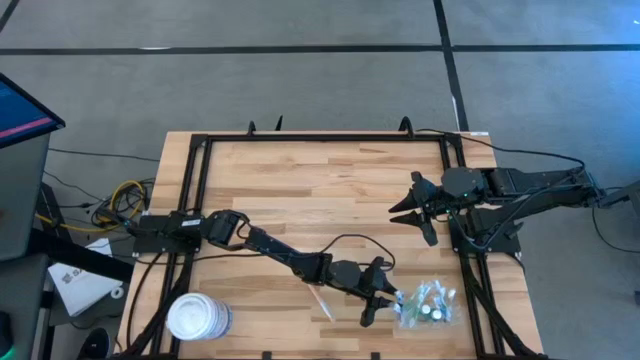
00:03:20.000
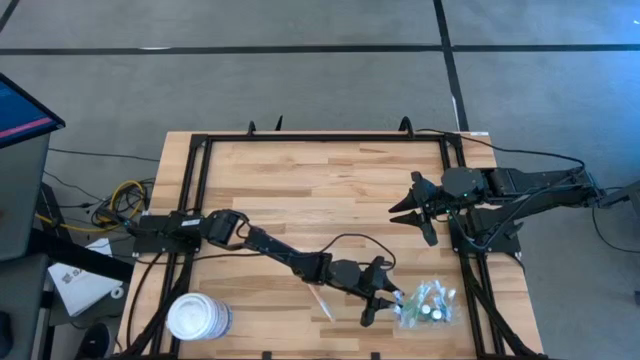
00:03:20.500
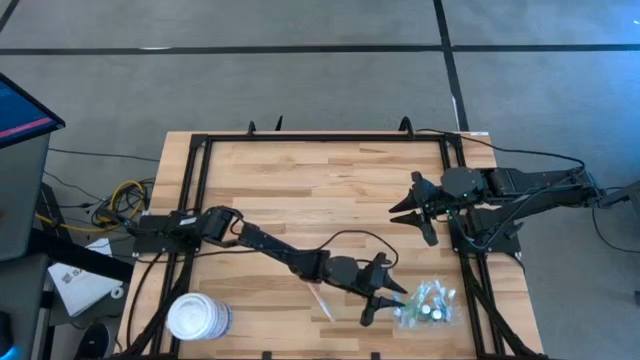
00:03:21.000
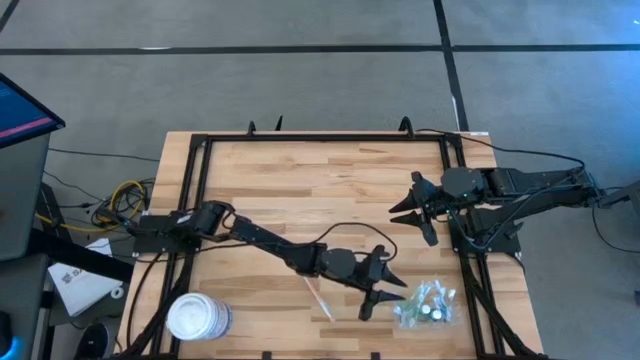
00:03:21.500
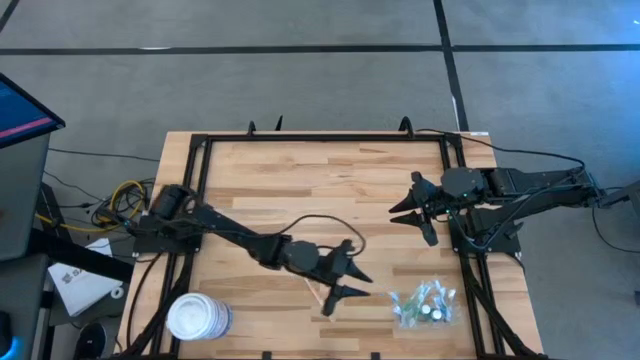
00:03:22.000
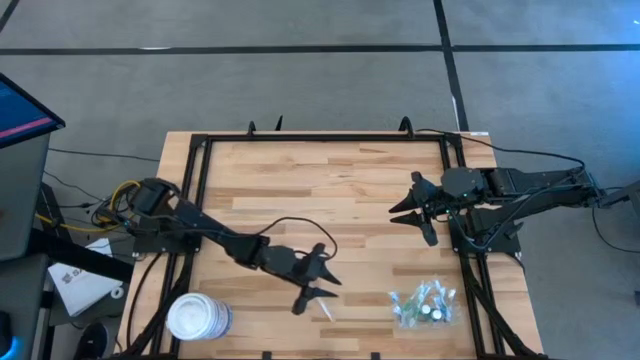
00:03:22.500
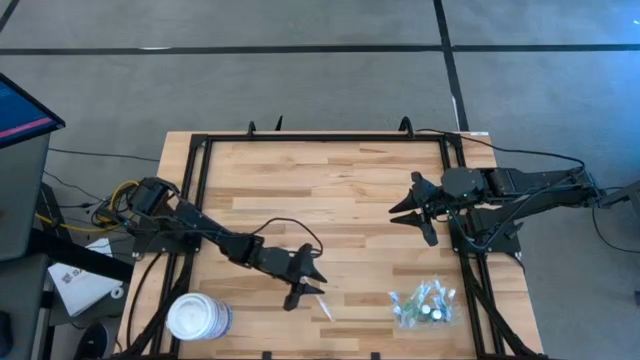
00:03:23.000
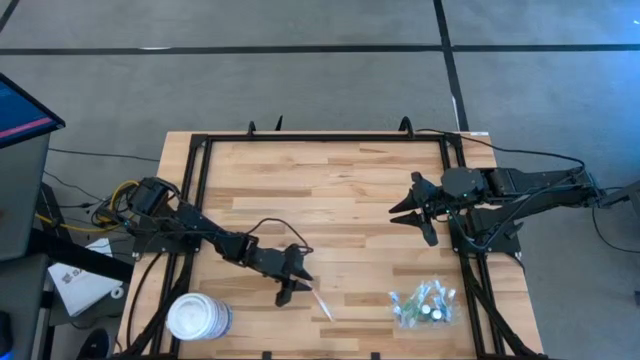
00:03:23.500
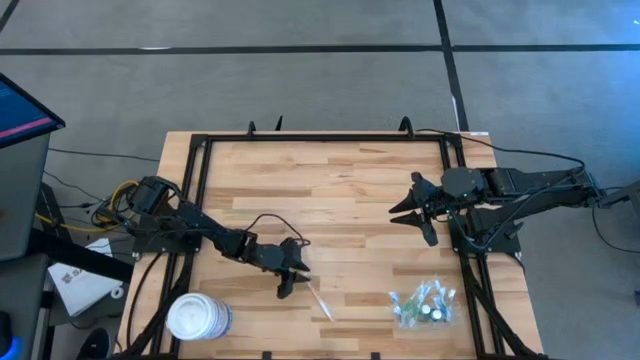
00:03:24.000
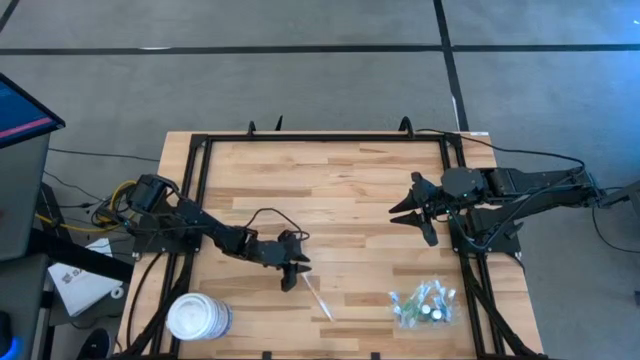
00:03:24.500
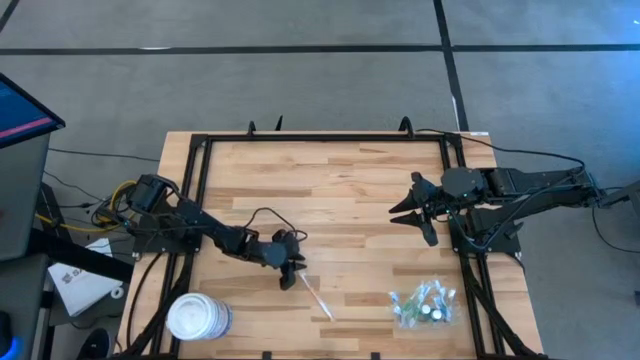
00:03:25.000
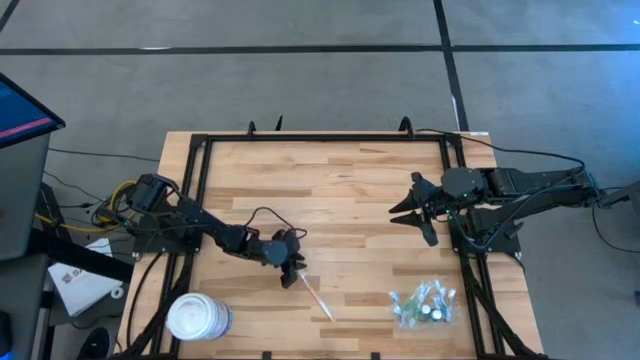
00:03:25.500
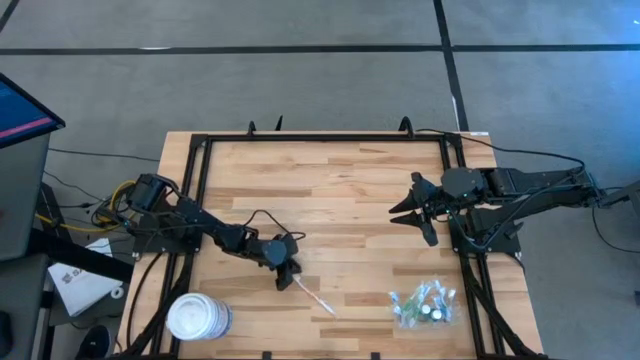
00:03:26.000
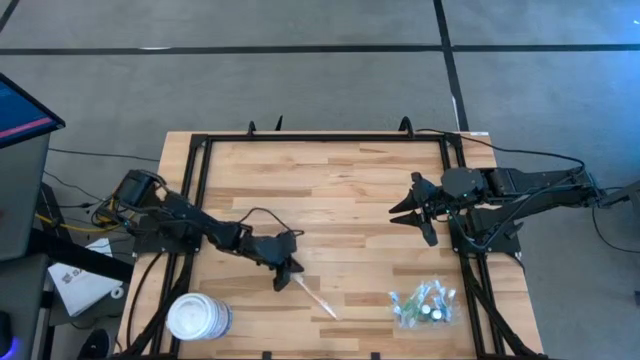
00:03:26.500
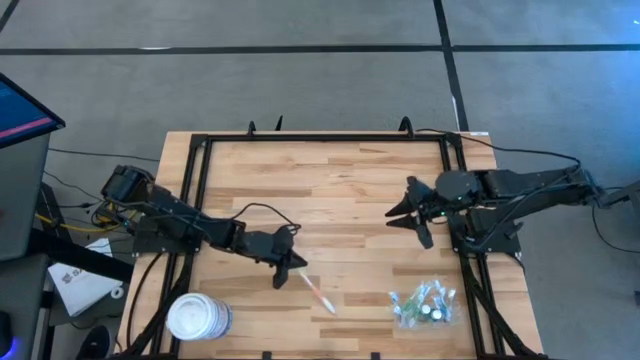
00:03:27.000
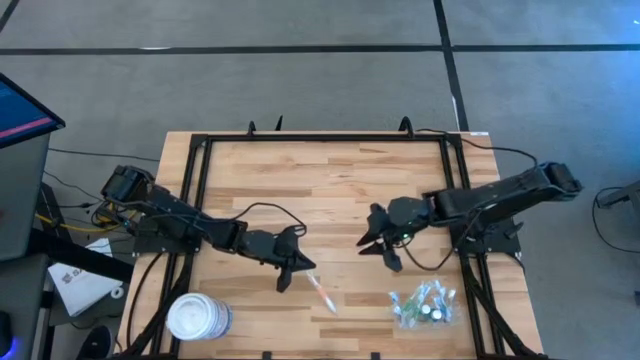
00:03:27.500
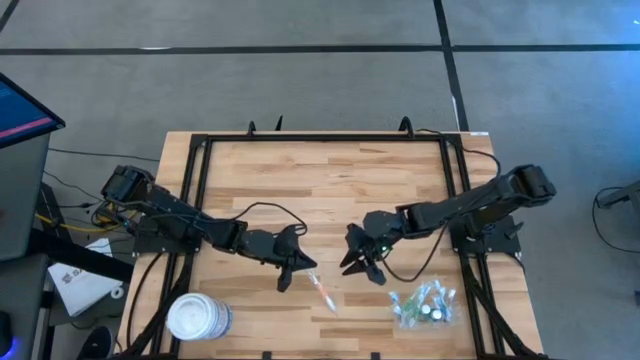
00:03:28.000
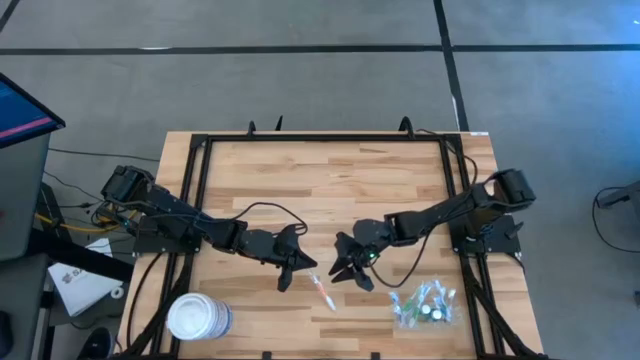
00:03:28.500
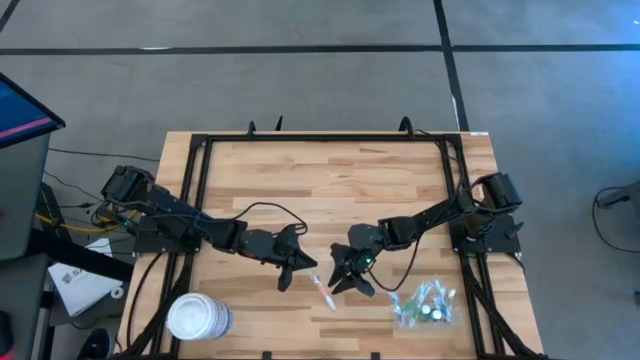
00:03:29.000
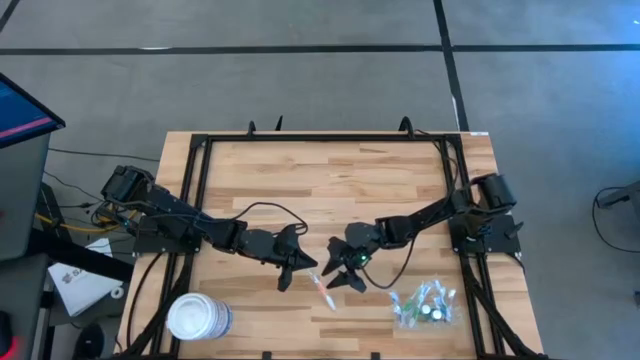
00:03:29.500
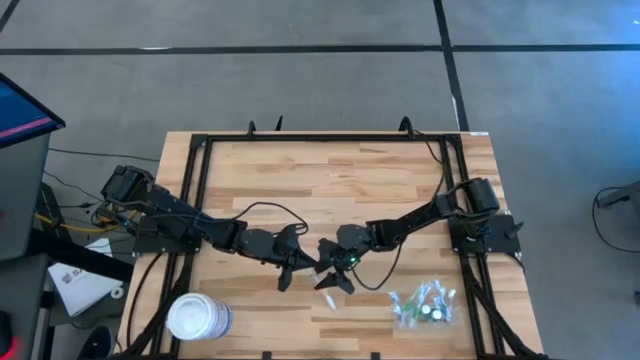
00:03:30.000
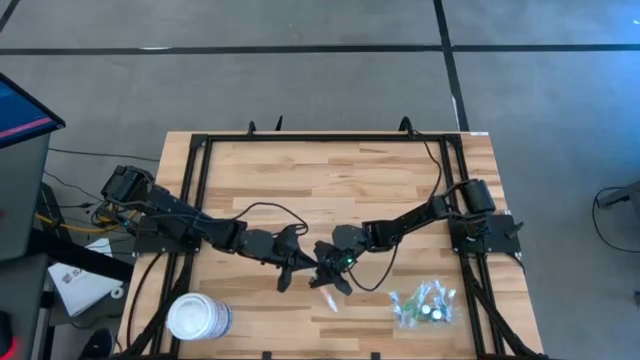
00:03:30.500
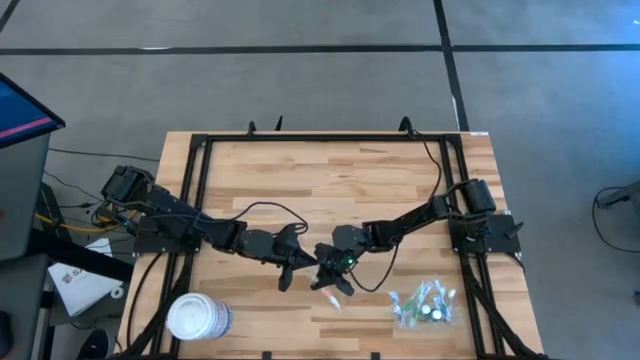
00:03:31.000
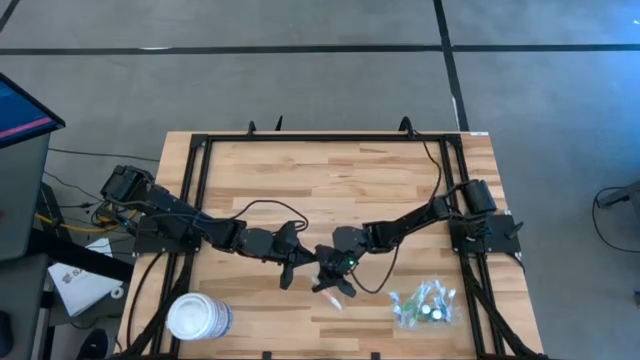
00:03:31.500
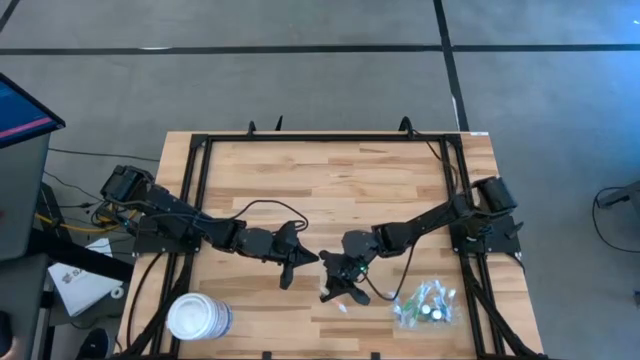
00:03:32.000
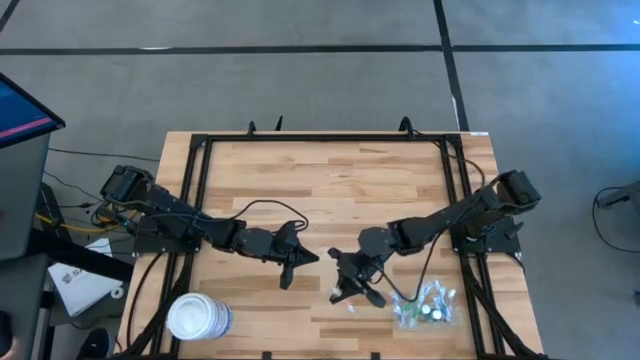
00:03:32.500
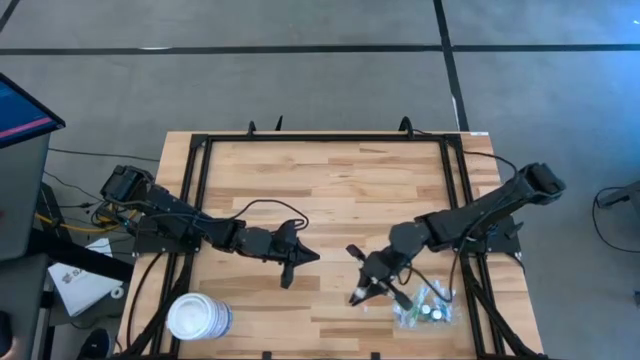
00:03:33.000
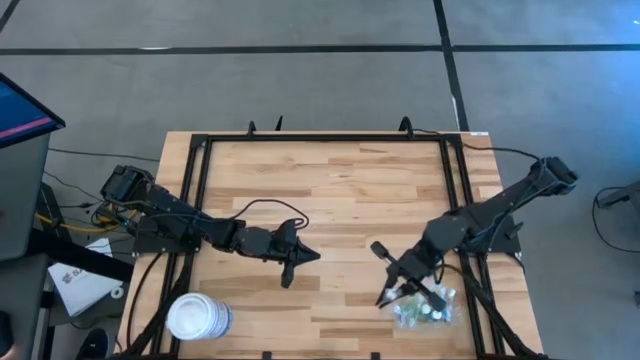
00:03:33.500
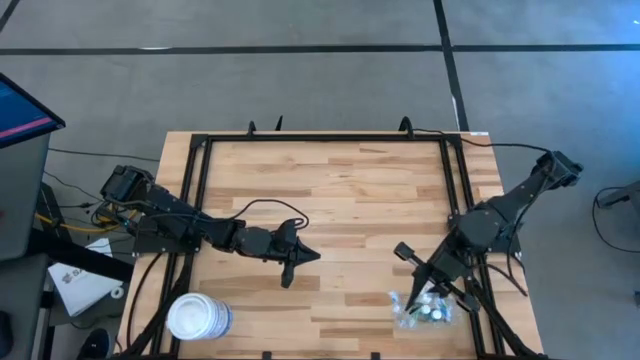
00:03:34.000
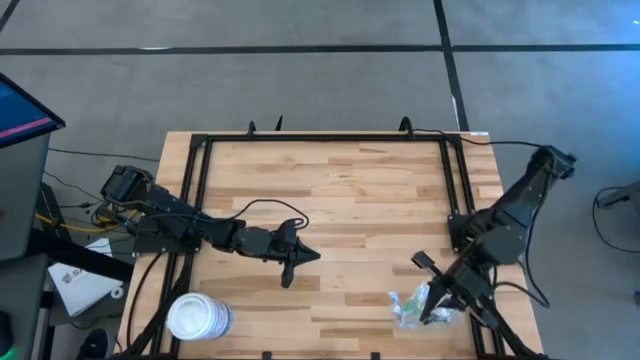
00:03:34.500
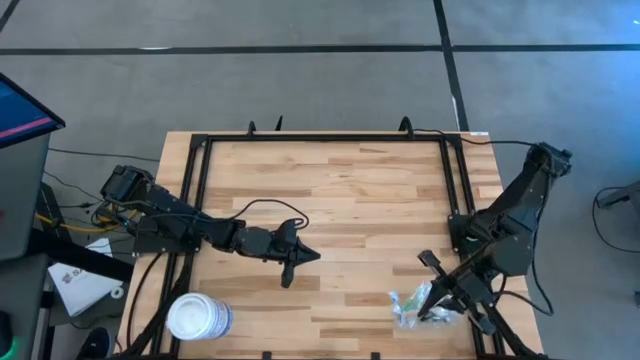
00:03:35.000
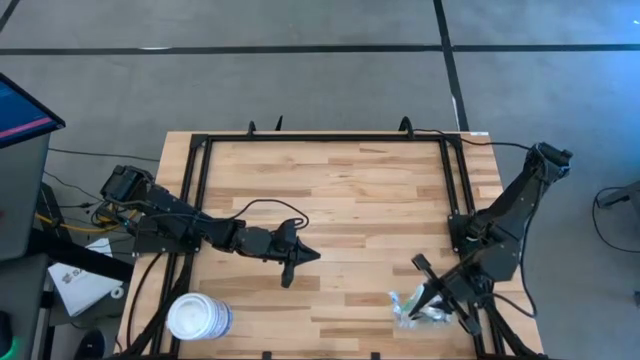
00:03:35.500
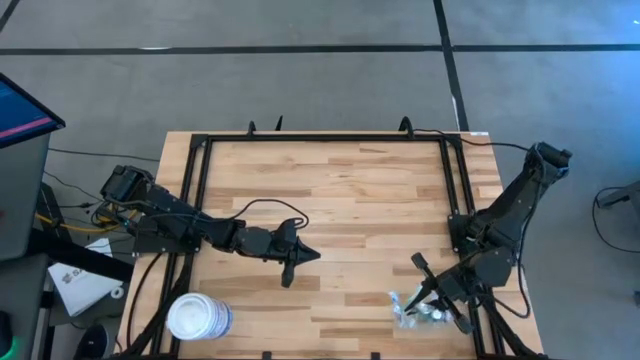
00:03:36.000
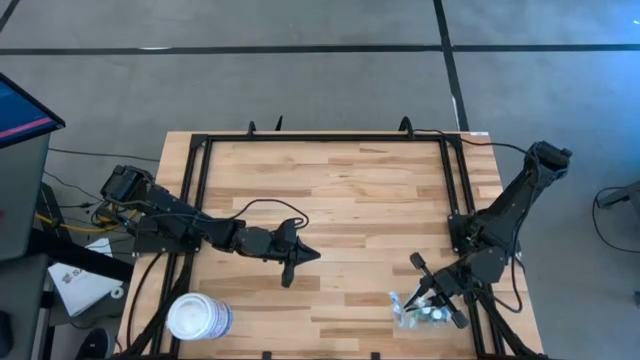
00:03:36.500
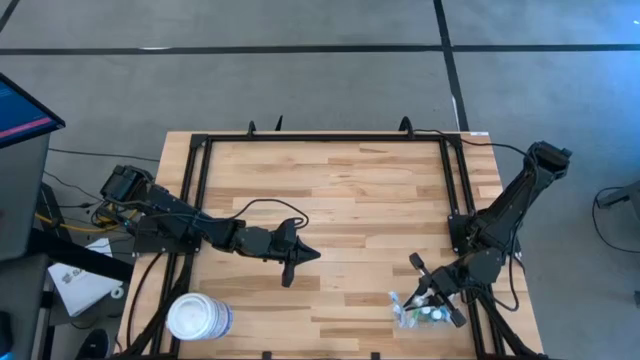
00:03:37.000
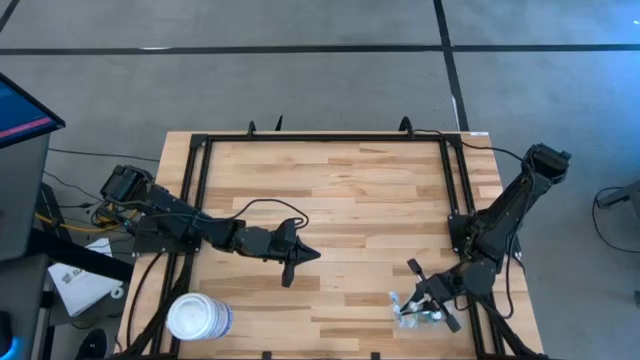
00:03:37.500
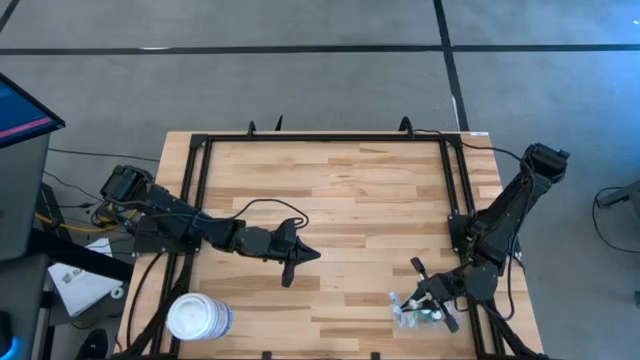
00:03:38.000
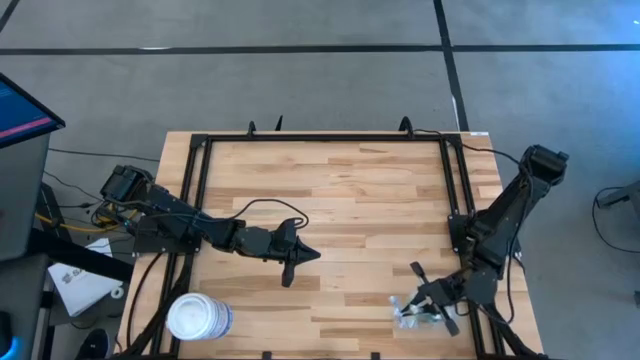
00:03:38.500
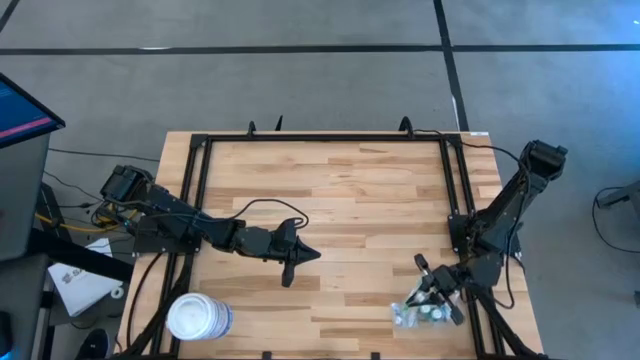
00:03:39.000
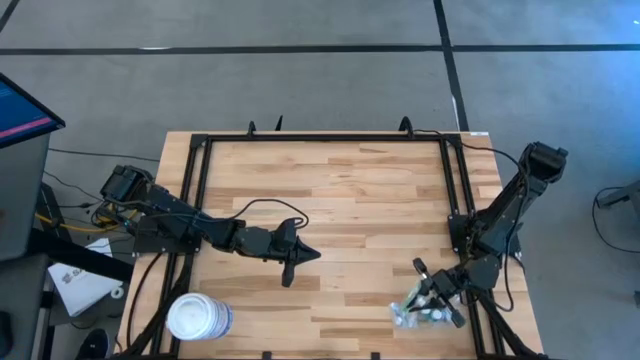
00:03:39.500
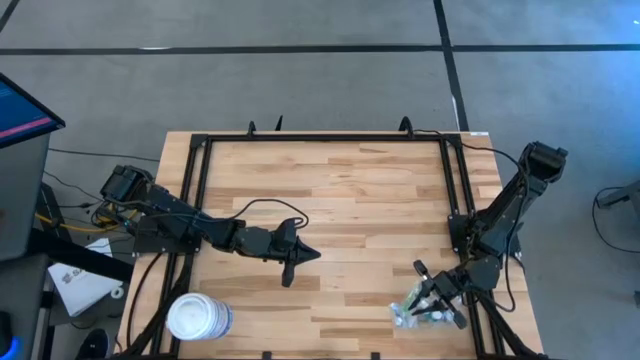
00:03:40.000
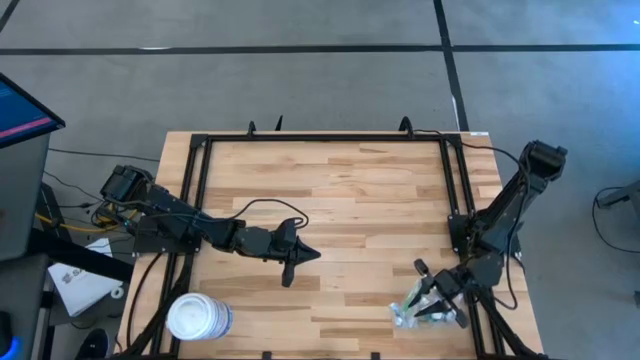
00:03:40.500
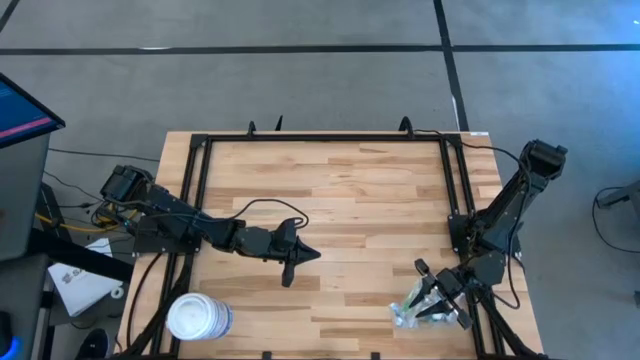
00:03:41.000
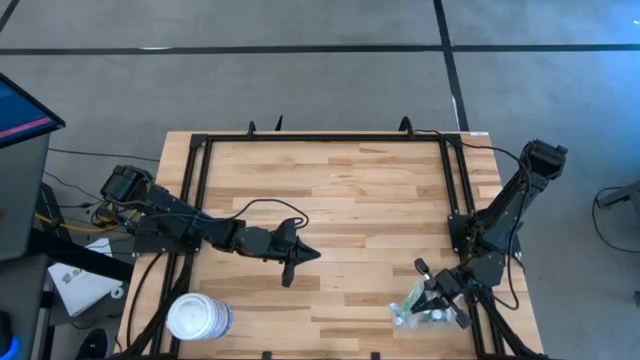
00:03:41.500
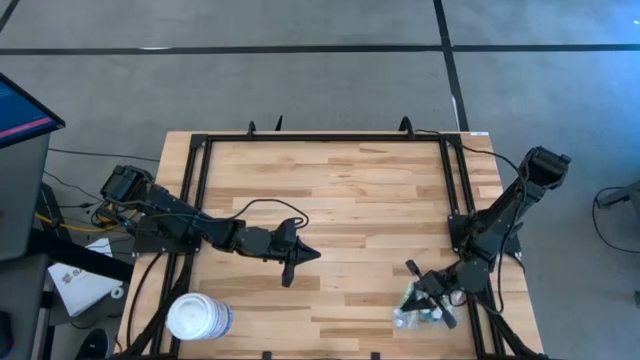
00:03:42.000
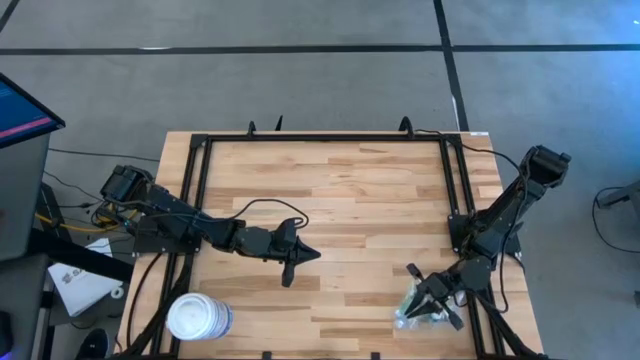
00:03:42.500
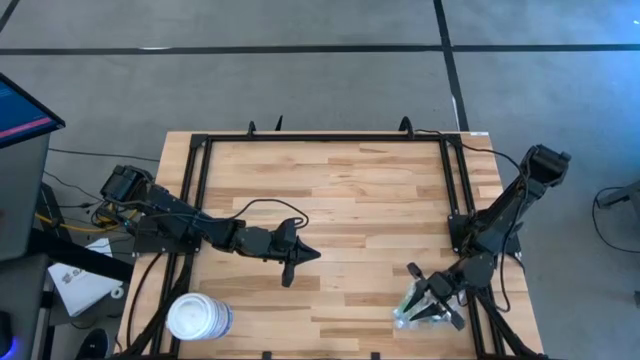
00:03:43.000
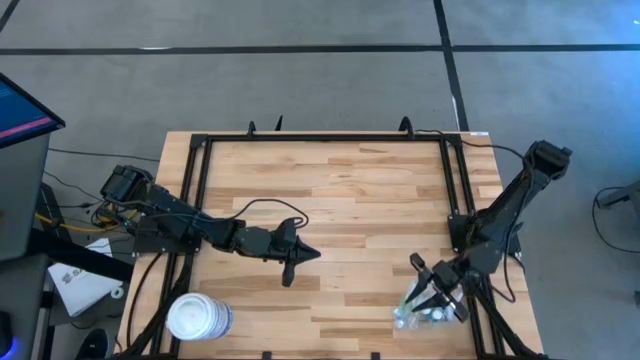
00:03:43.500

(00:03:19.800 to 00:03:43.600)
Task: Pick & Place toothbrushing station
Put the orange toothbrush into the transparent organizer
